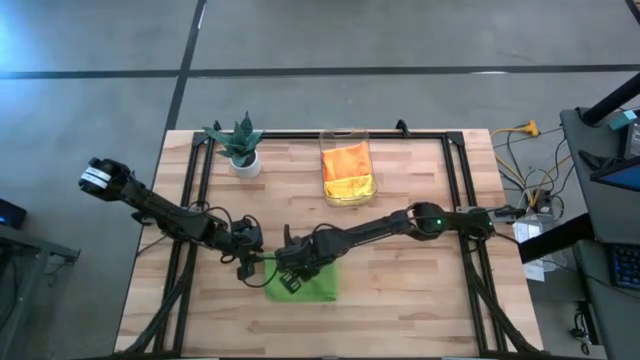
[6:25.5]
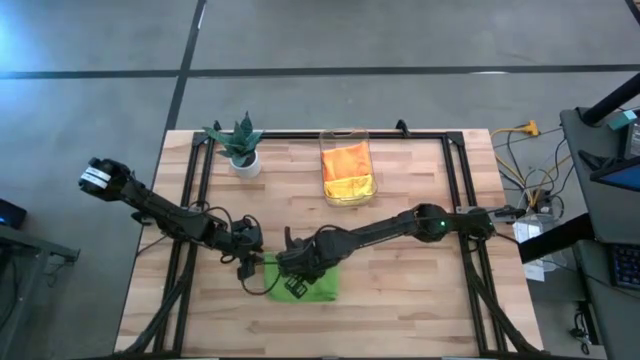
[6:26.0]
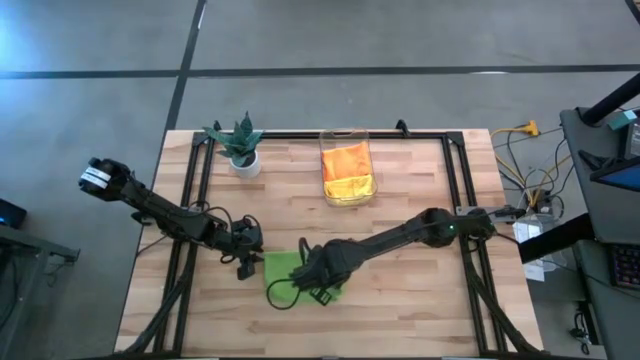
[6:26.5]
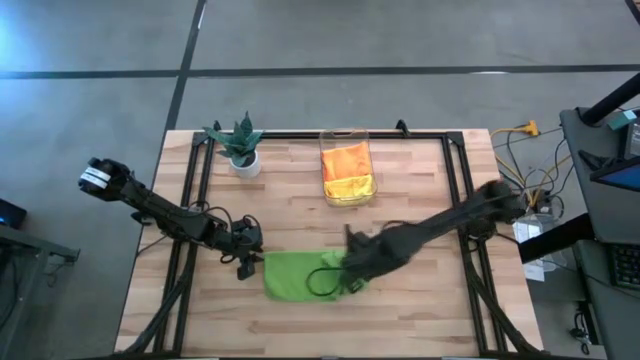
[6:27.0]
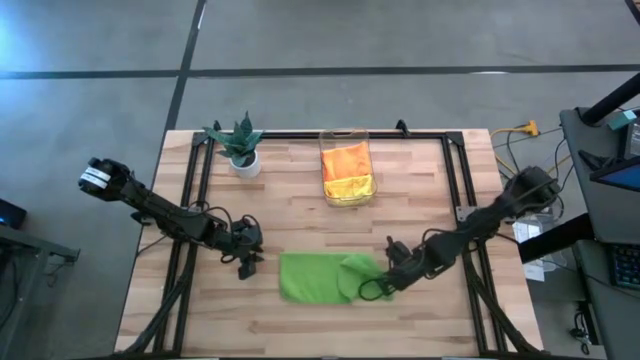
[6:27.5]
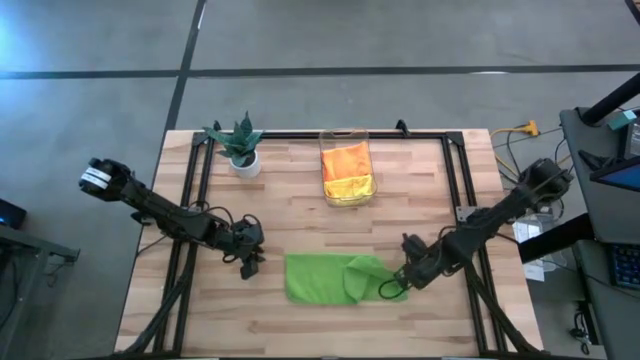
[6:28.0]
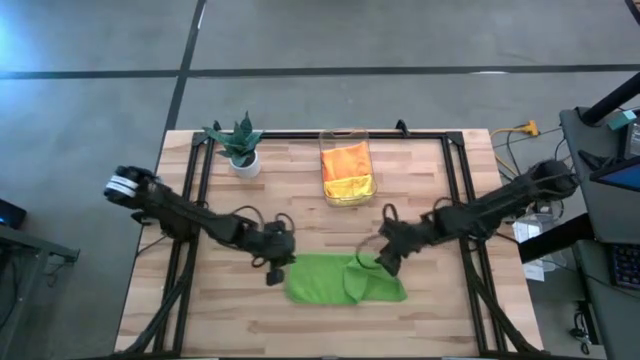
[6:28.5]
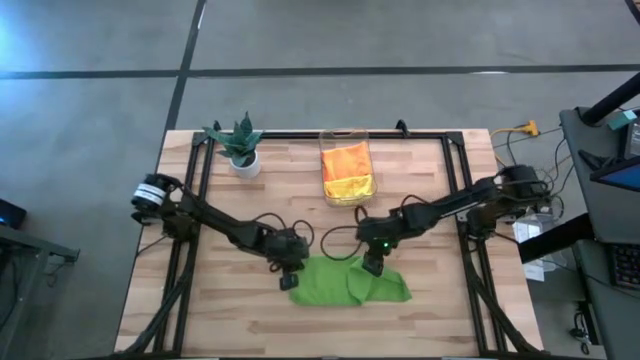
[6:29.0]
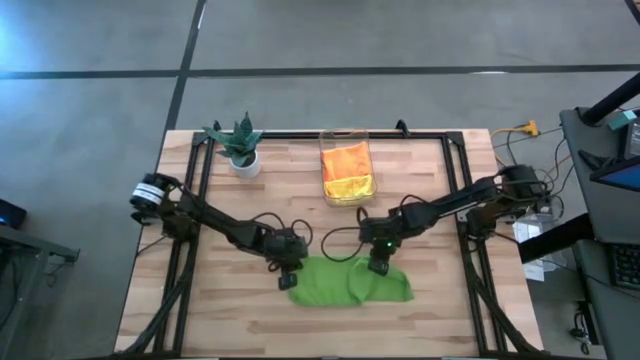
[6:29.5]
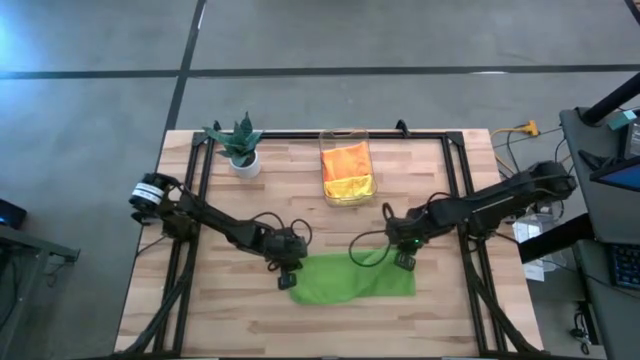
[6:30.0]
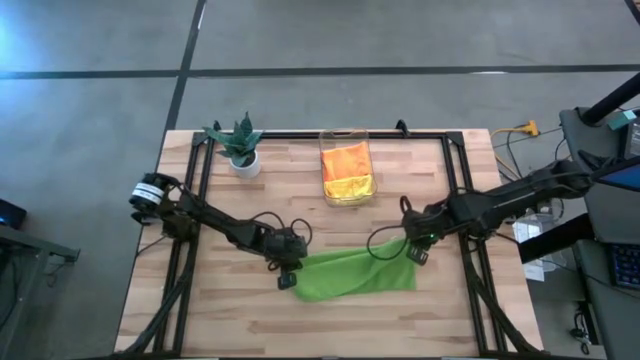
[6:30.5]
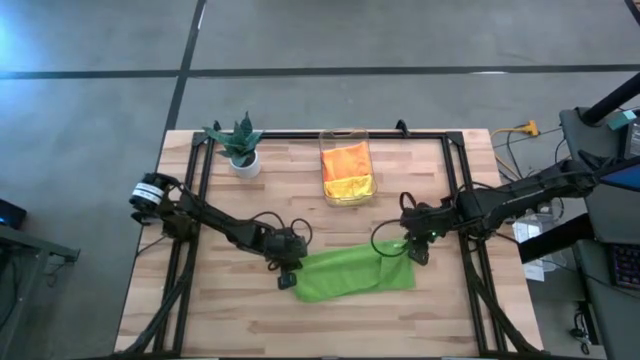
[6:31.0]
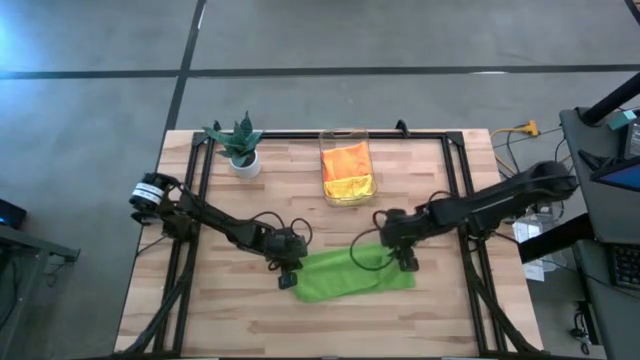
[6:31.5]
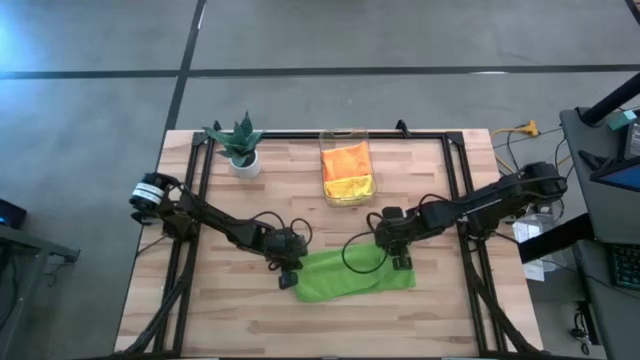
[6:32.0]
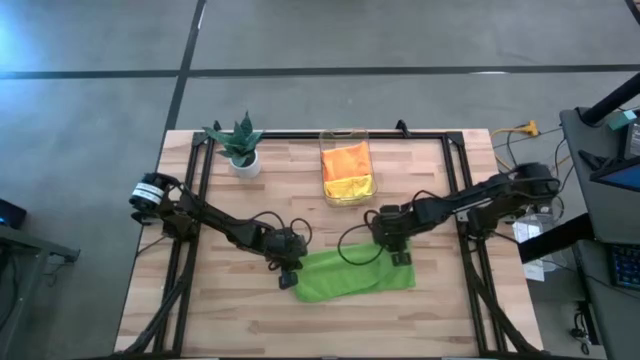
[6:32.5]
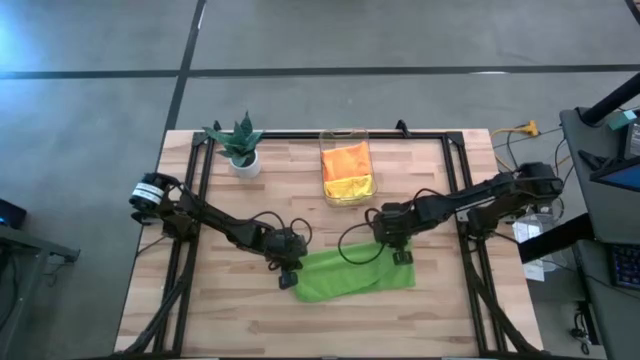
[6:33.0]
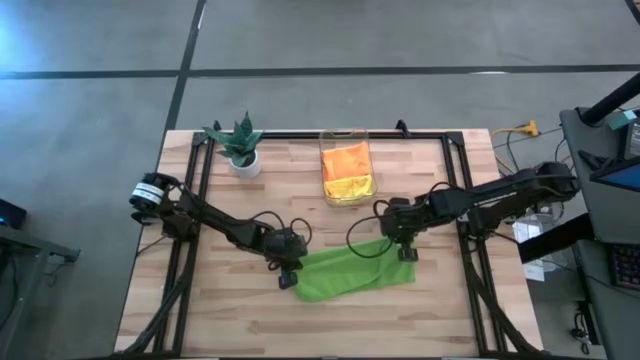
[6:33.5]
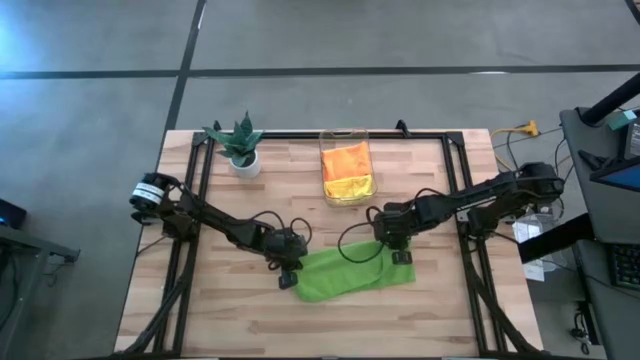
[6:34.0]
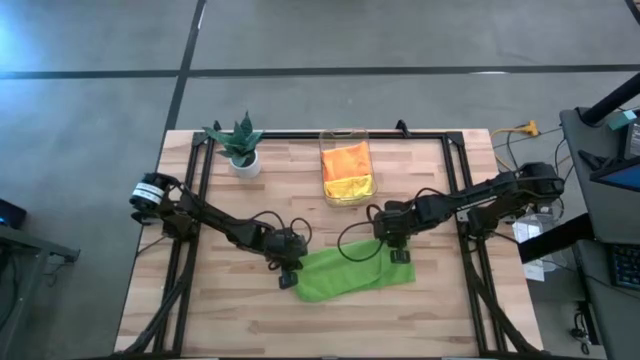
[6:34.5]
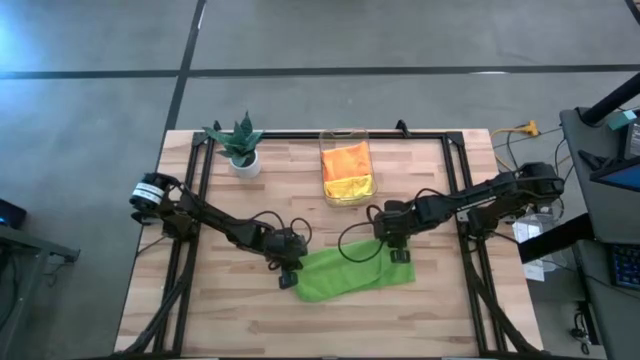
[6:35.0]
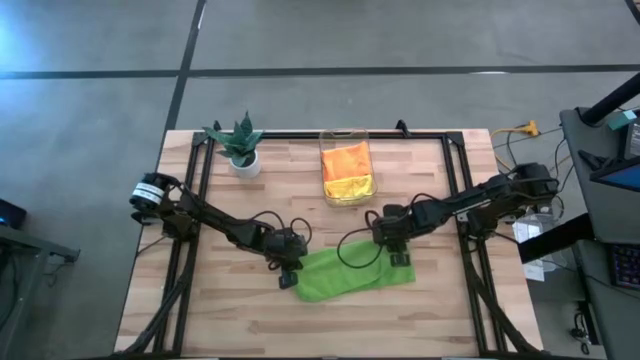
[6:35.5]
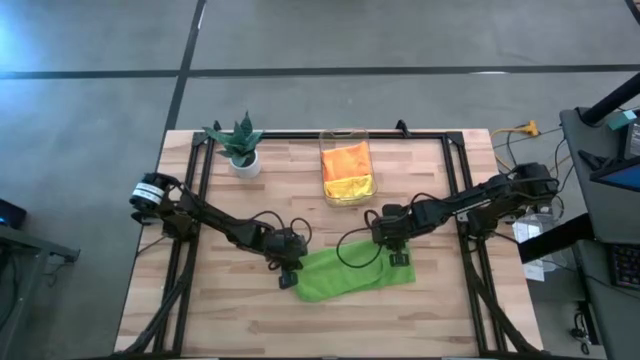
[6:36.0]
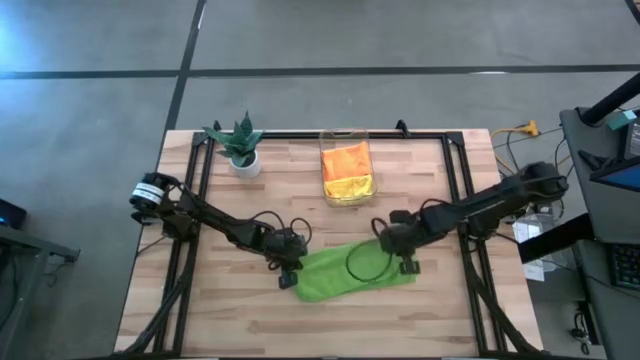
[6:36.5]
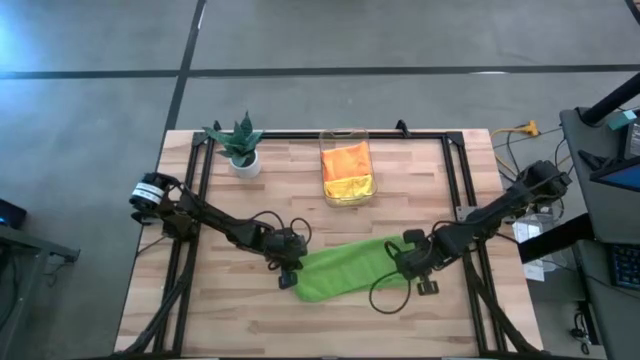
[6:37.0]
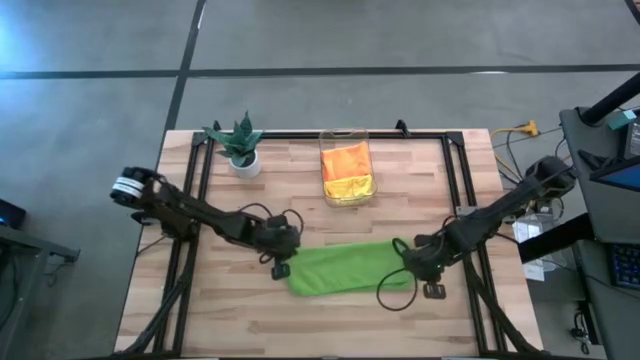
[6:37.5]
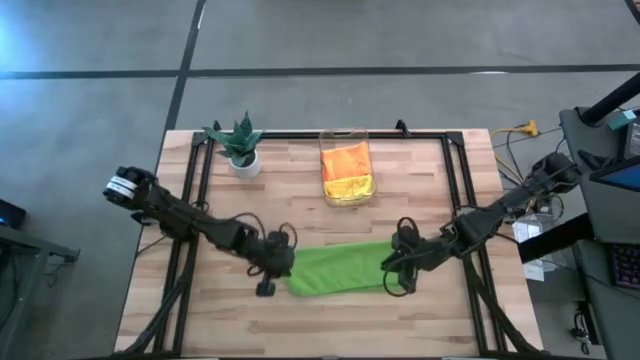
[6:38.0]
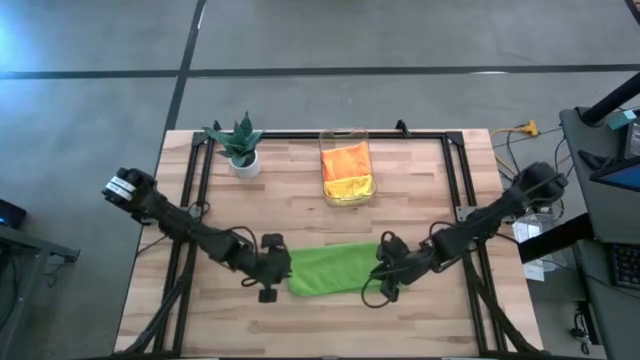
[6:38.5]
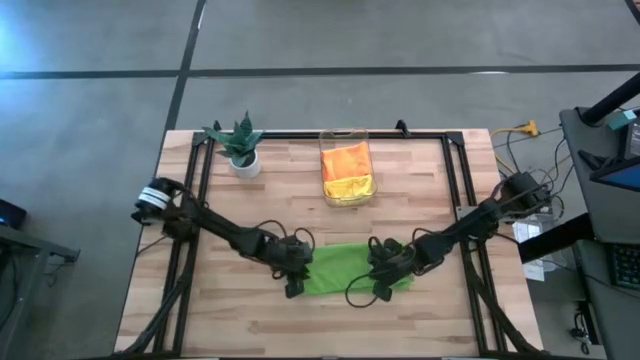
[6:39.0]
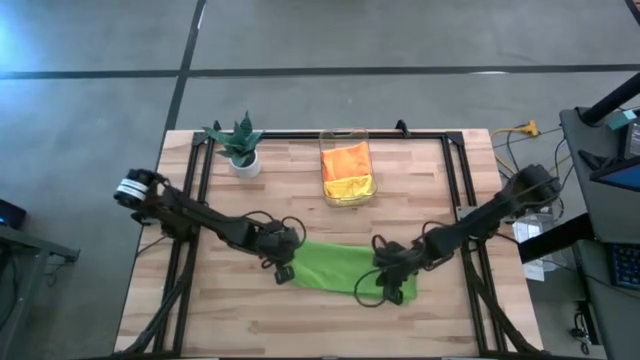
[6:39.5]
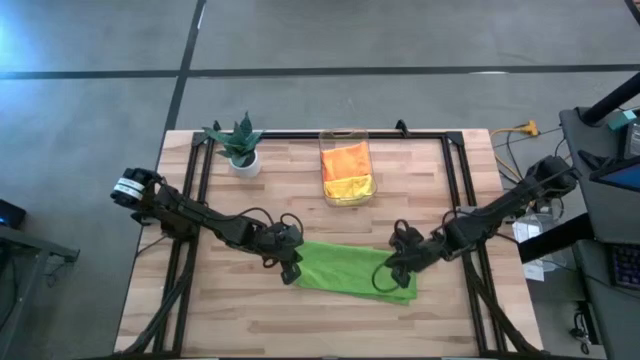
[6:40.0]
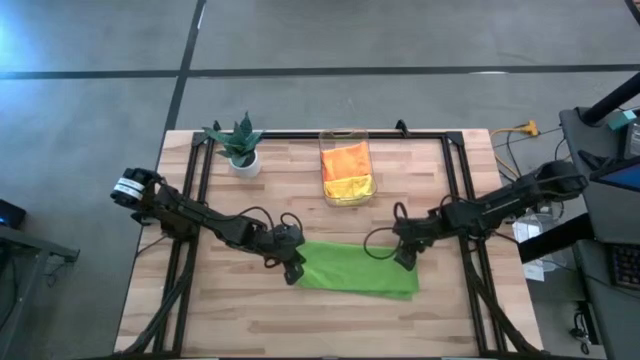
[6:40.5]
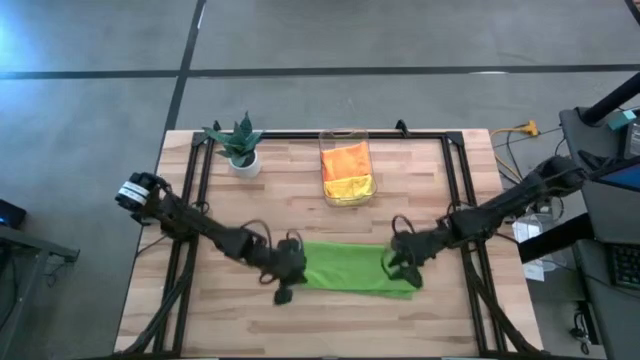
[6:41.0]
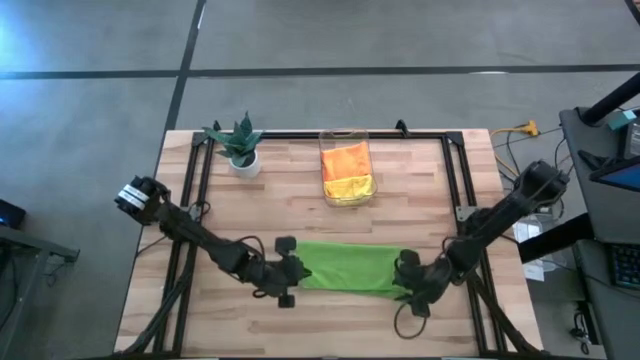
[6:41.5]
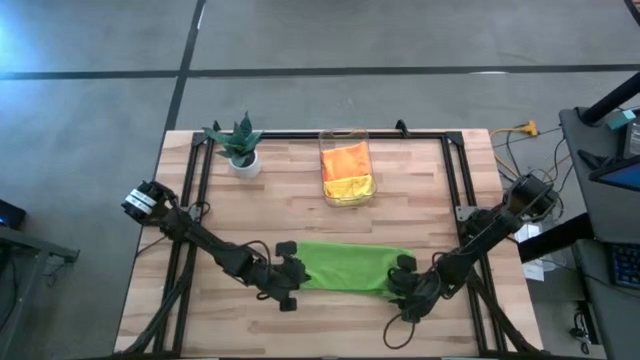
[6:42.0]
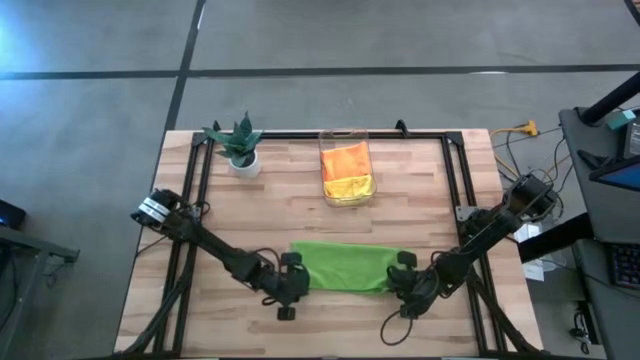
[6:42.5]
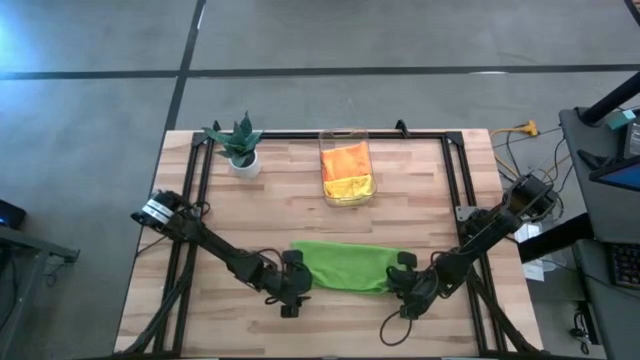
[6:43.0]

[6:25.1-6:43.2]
Task: Fold microfiber towels
Fold the green towel

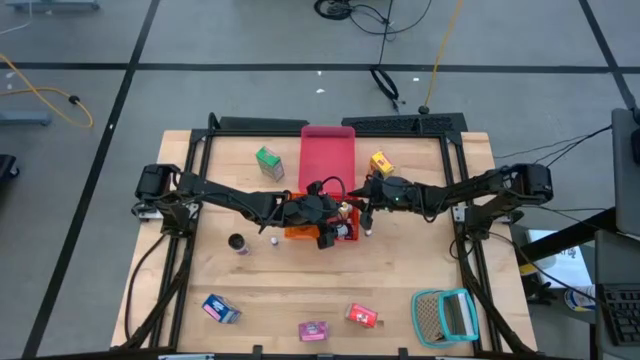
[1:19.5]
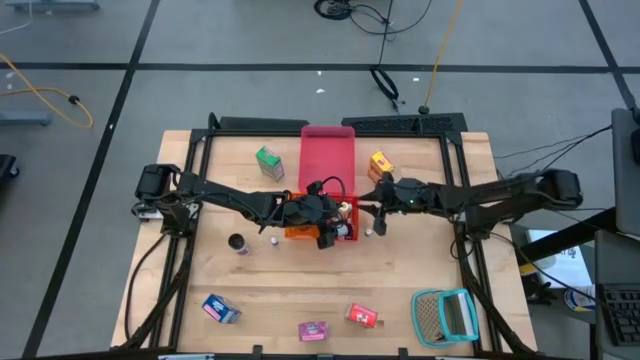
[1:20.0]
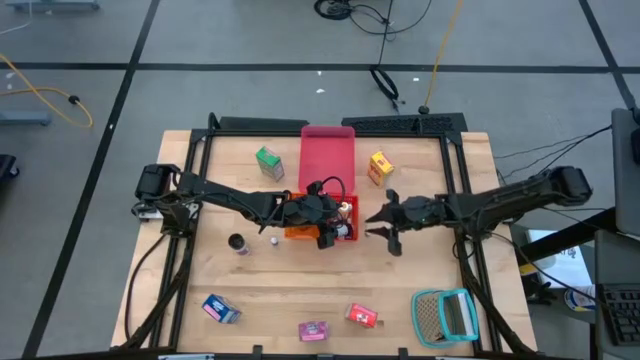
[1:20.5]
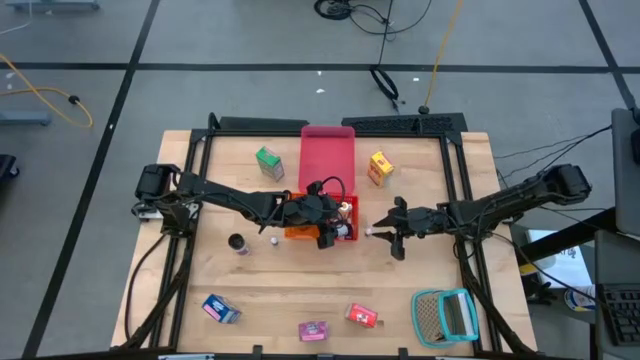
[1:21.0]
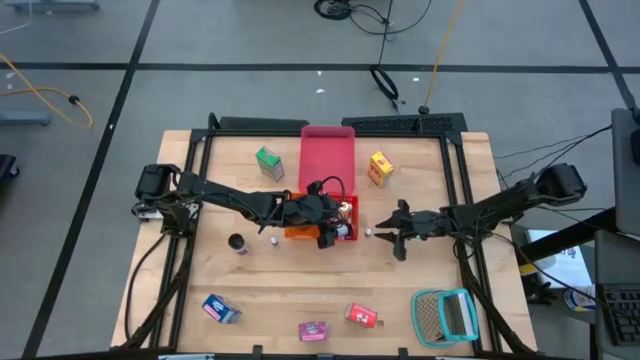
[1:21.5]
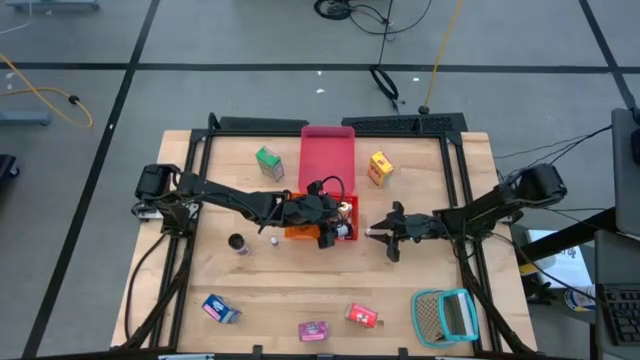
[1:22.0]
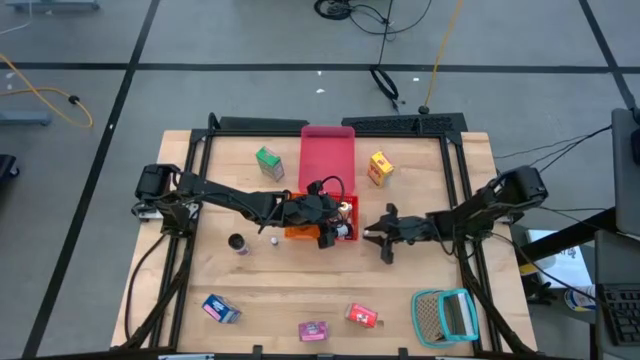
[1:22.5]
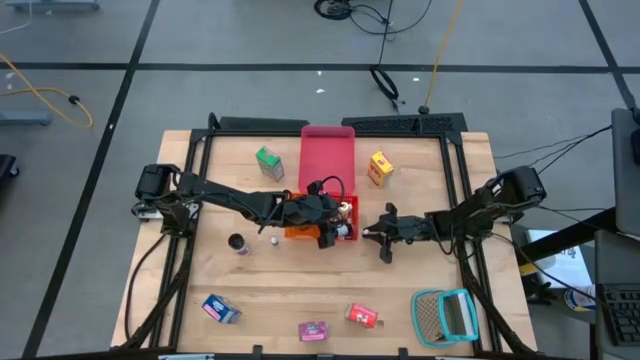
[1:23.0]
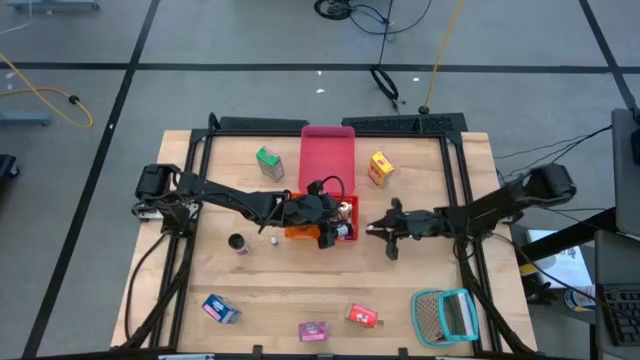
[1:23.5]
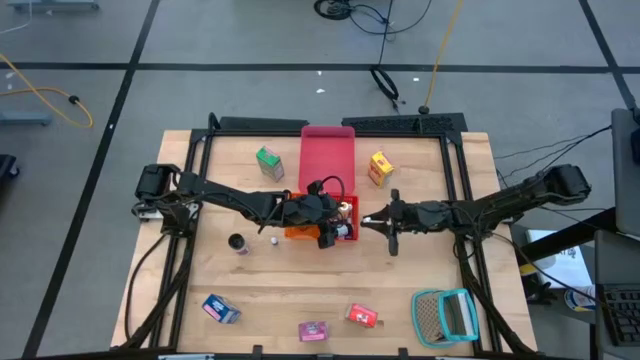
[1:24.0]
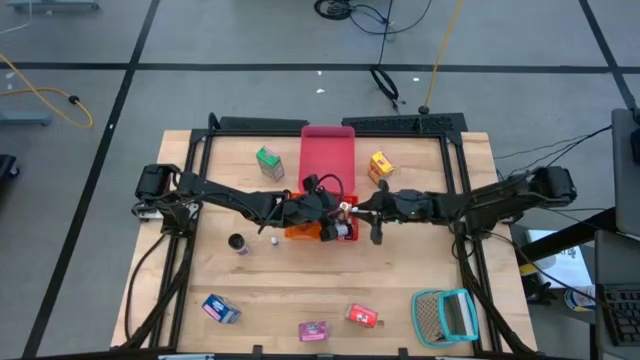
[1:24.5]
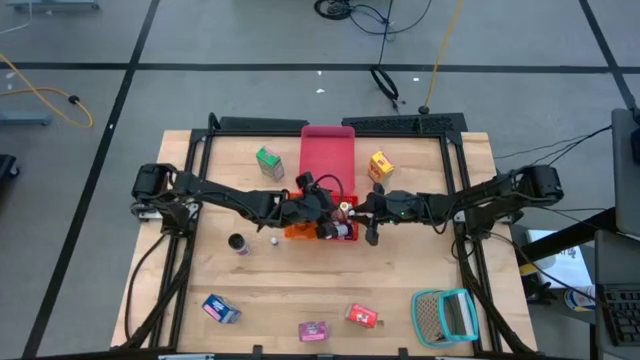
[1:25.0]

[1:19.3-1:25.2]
Task: Pick & Place Kitchen Items
Put the small green food coloring bottle into the red basket
